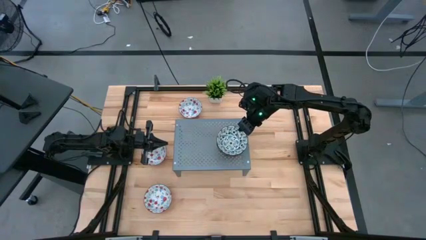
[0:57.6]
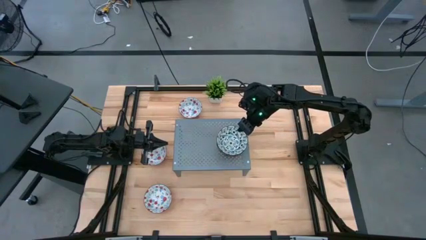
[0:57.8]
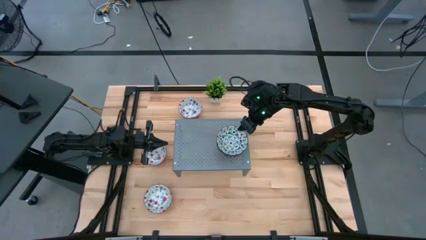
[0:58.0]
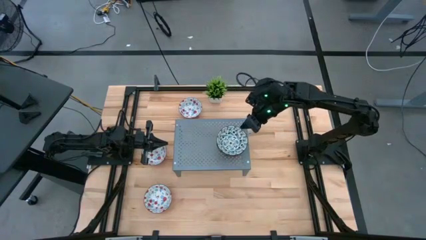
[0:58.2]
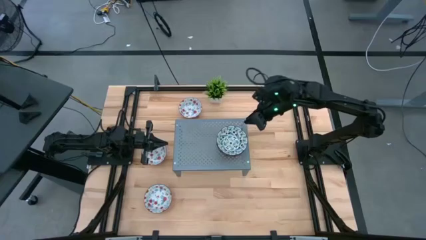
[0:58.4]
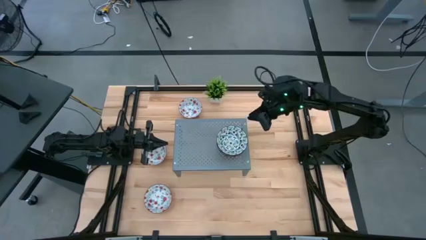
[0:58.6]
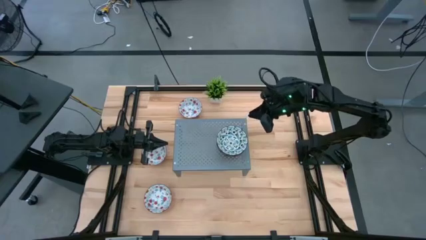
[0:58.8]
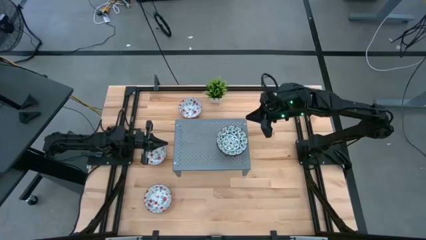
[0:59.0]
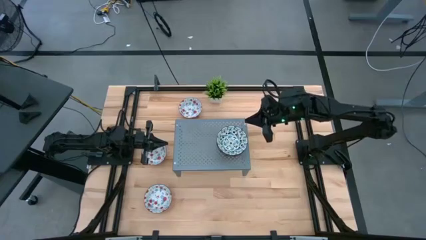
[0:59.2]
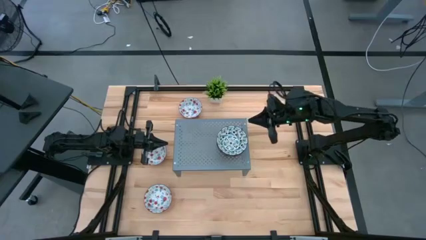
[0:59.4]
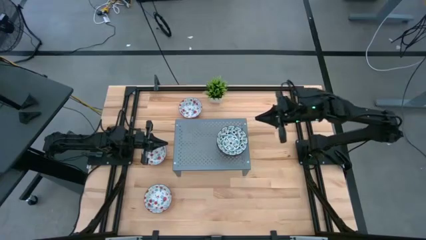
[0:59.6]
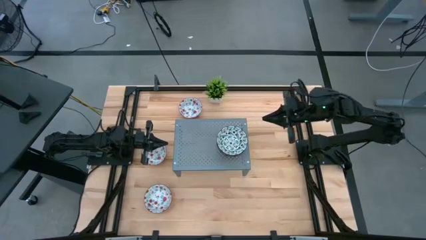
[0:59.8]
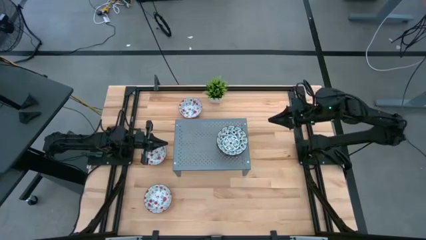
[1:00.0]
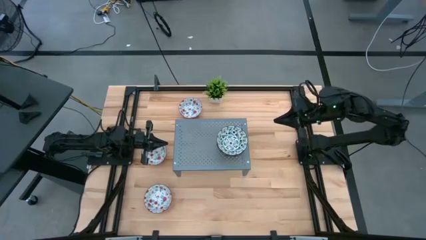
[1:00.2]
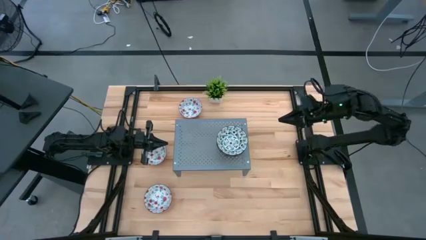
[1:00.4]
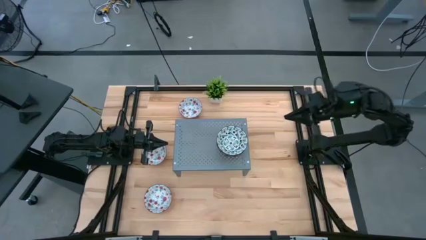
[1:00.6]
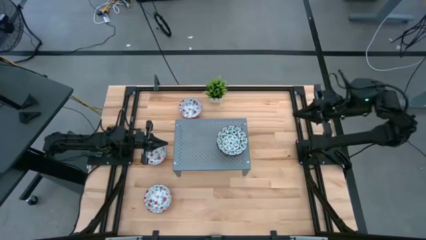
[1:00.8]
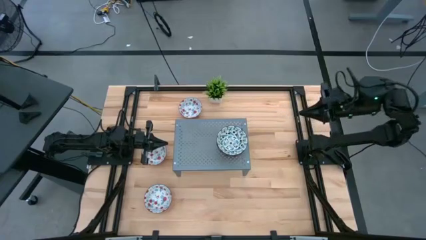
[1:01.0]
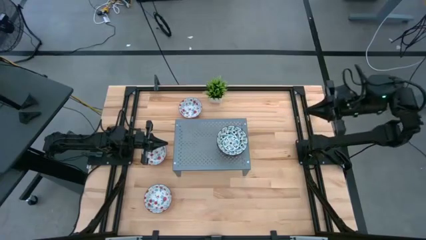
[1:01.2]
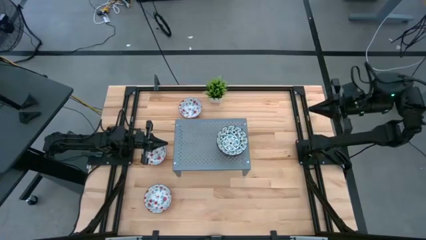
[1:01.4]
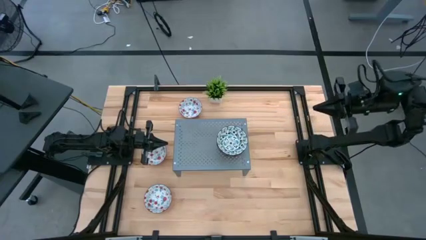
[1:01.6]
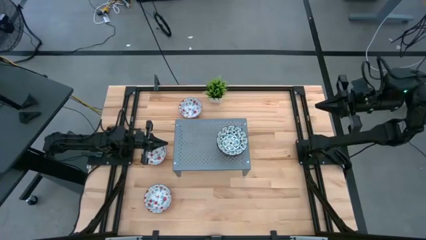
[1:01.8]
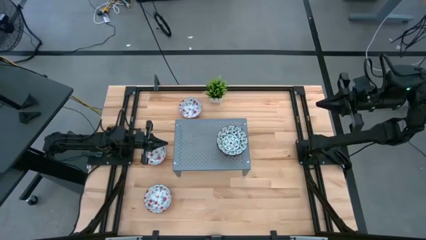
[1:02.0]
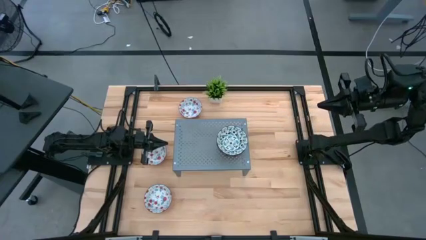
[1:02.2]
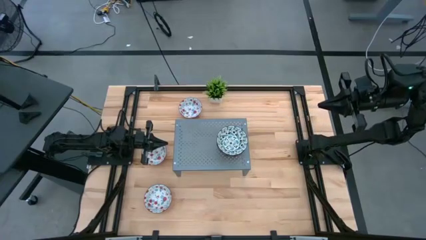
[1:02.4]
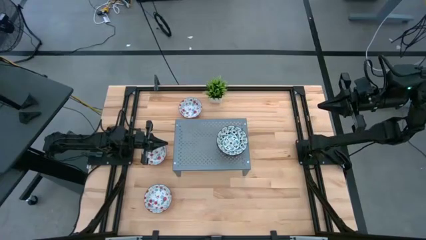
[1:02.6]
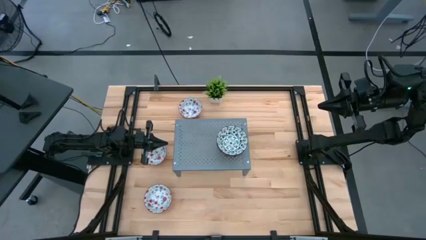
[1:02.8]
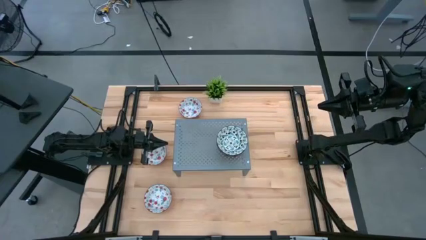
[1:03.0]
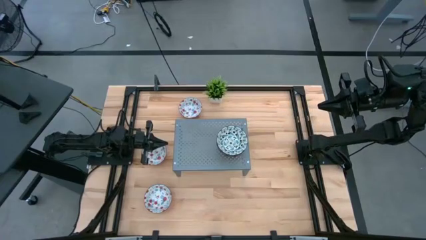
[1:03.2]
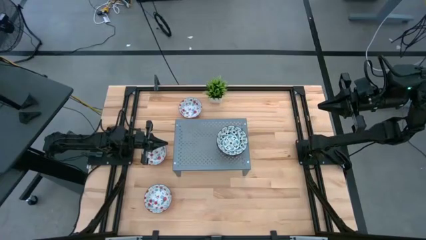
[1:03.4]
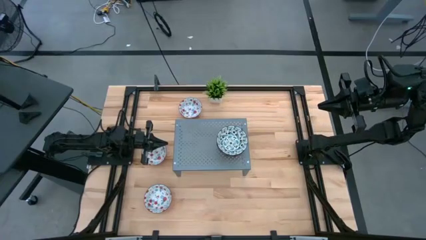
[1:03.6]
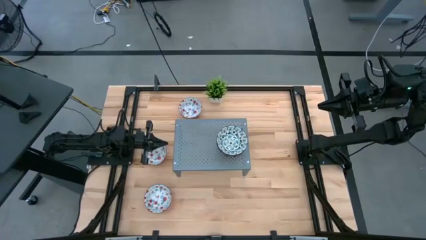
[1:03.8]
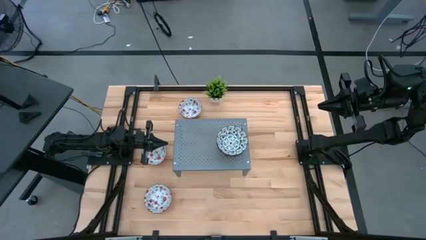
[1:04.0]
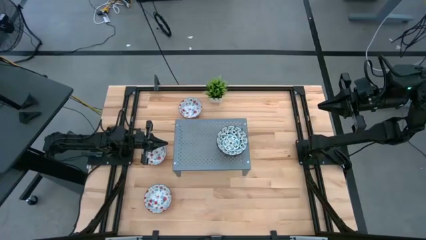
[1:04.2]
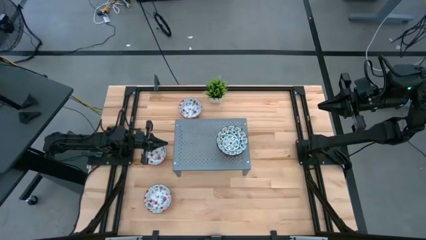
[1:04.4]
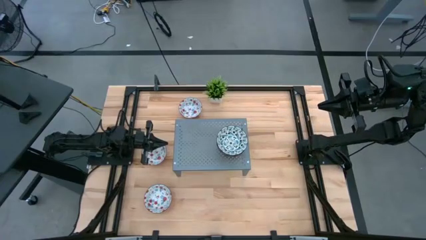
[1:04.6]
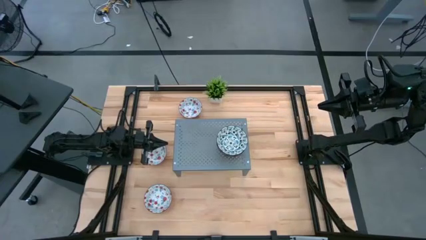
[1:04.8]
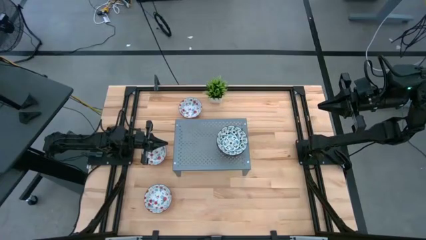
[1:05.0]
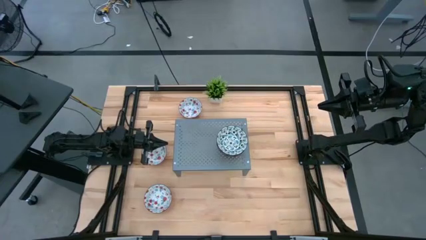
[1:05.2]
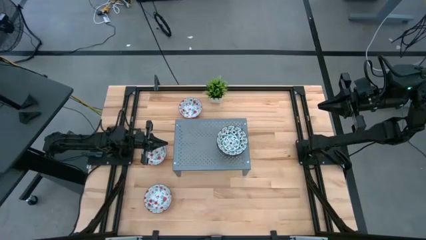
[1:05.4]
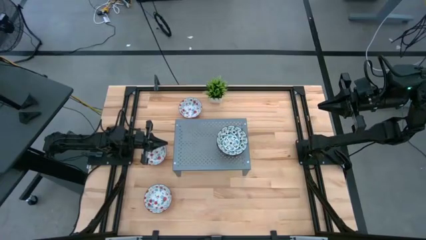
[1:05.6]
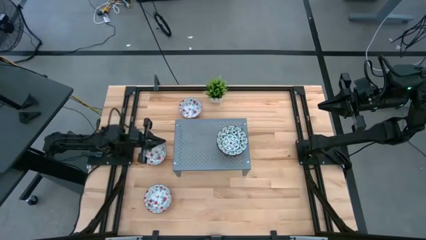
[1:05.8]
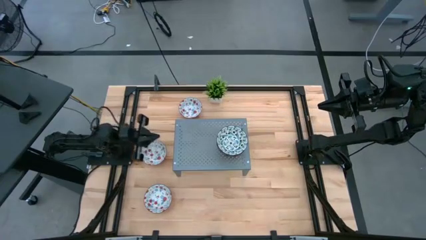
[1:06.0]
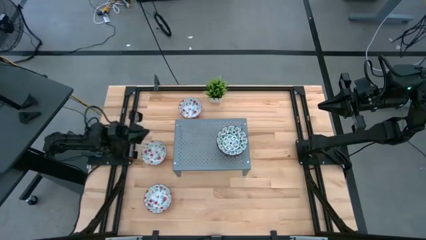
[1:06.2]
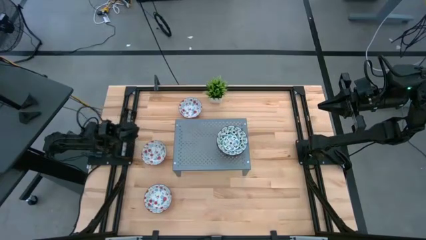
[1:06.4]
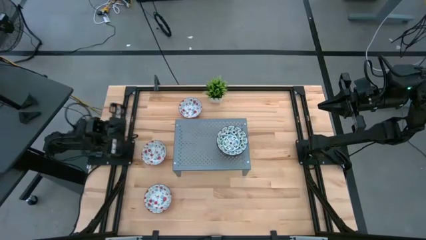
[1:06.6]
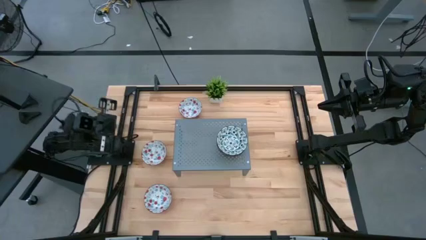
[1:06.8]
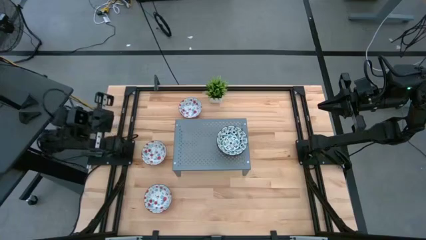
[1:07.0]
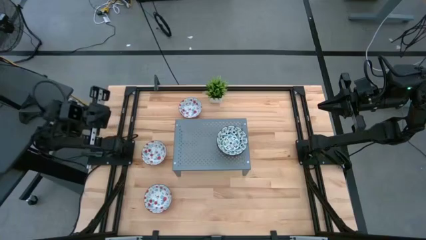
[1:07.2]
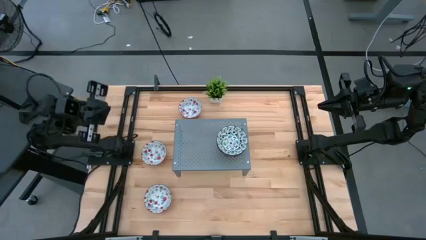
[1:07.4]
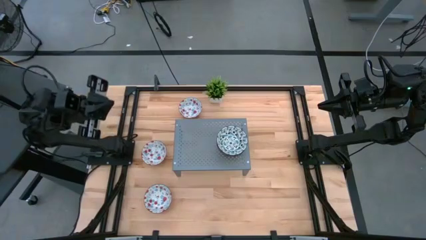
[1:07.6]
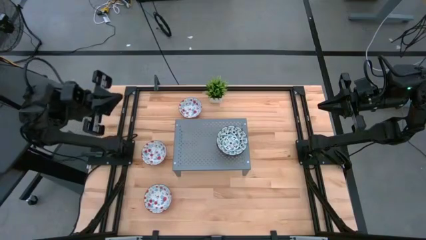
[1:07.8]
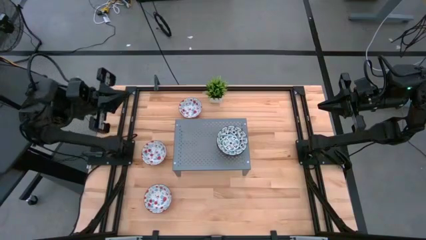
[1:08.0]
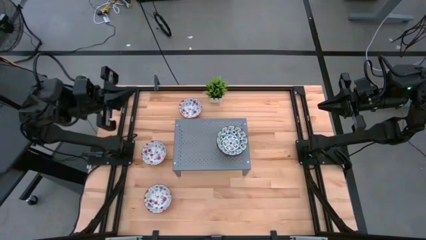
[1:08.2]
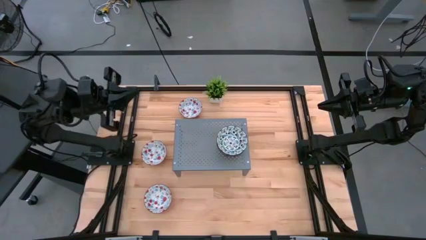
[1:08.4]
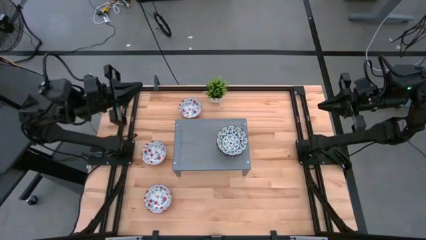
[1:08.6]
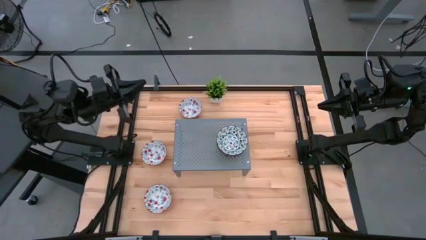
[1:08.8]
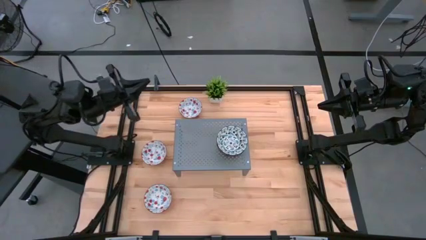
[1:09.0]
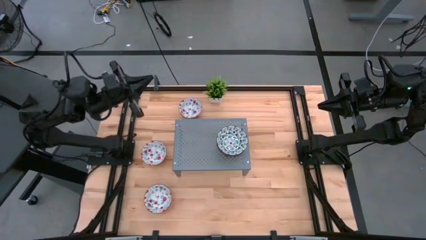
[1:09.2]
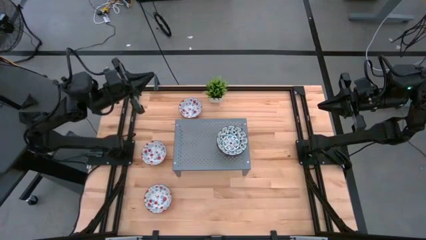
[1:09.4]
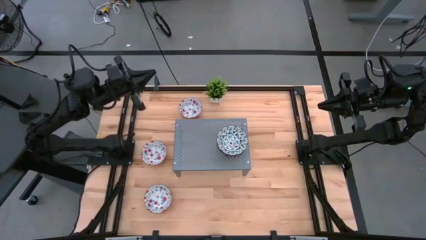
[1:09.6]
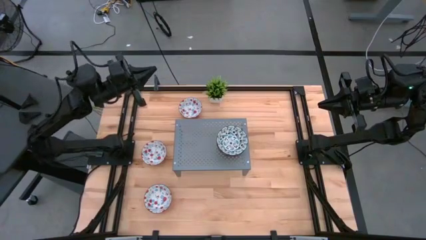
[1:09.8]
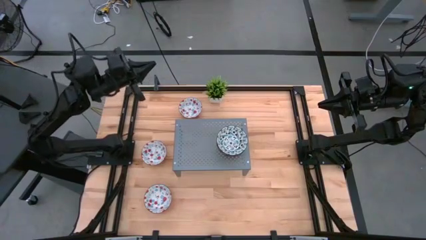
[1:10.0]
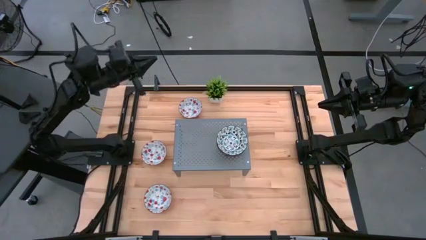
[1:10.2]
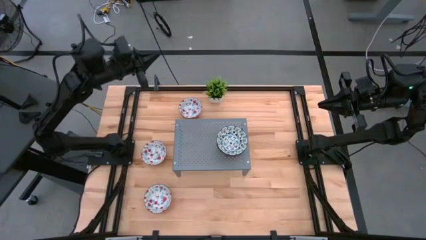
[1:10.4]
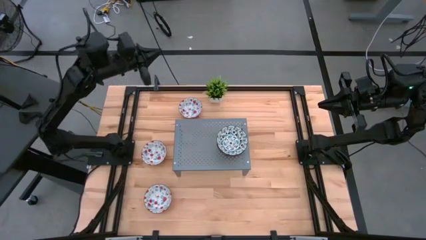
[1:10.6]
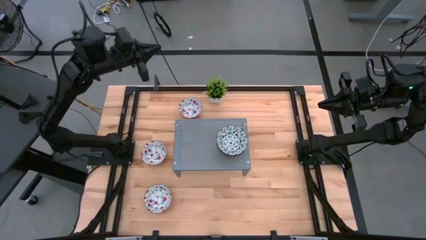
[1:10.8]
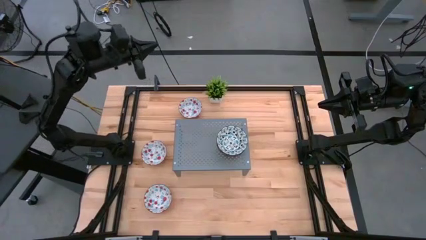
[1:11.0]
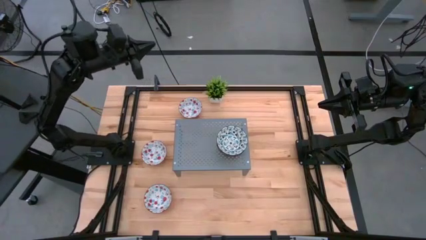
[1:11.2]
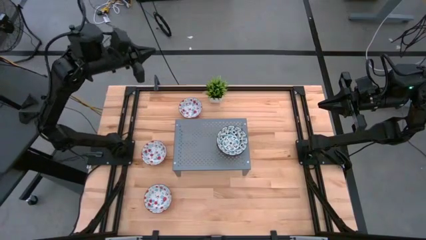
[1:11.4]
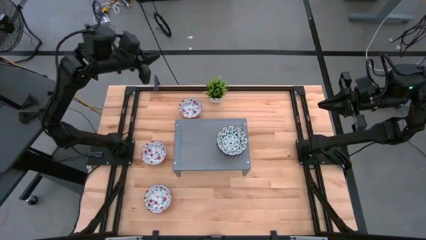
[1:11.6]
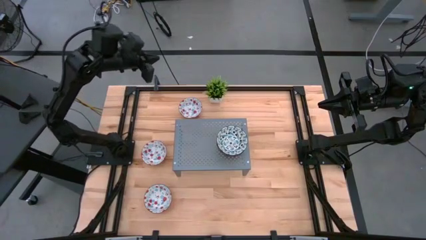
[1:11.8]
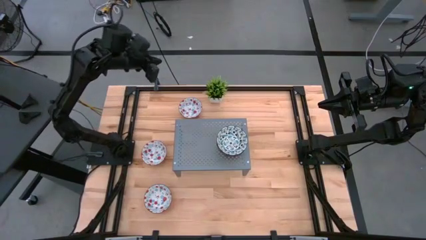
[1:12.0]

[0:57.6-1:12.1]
Task: Pick & Place Mini bowls
Put the top red patterned bowl on the shelf
